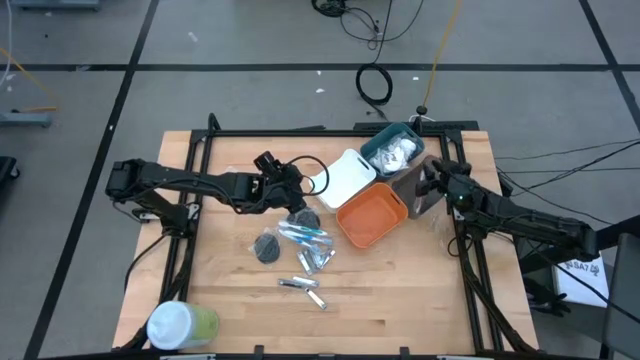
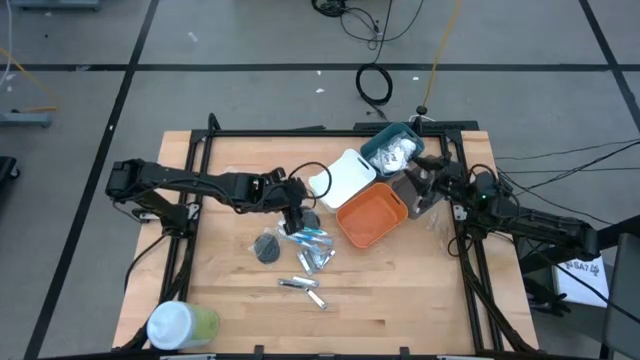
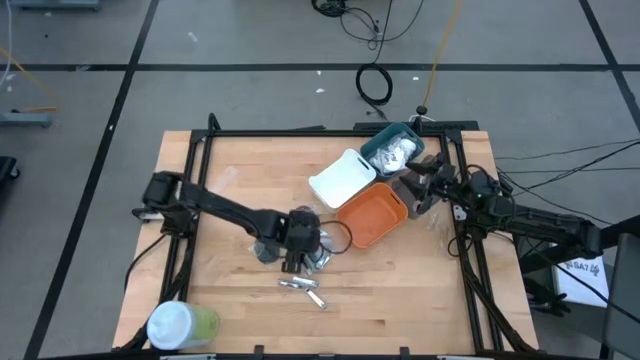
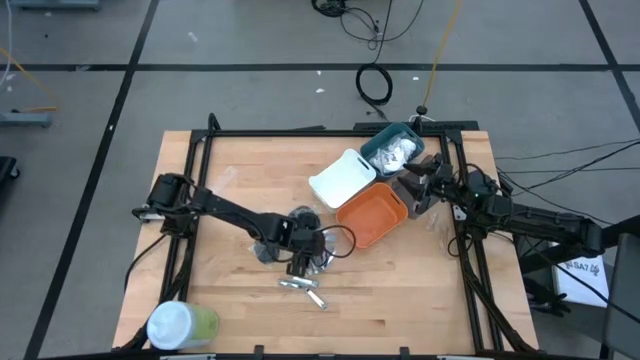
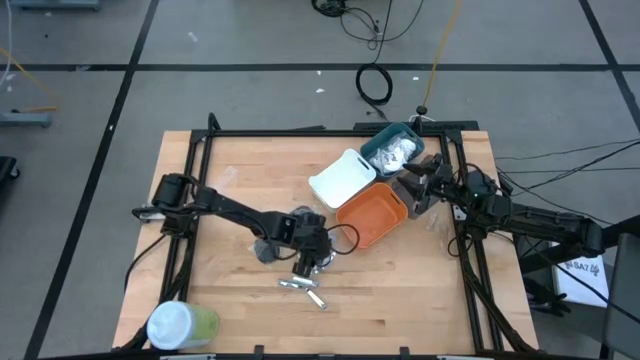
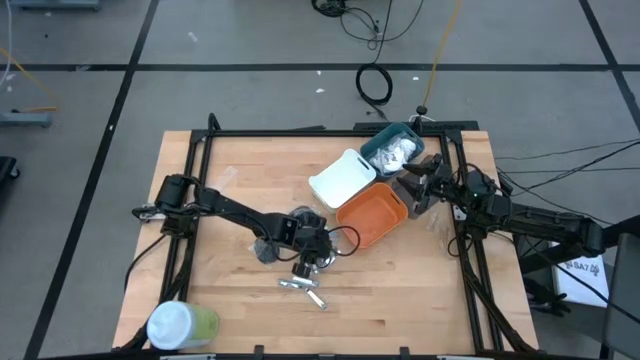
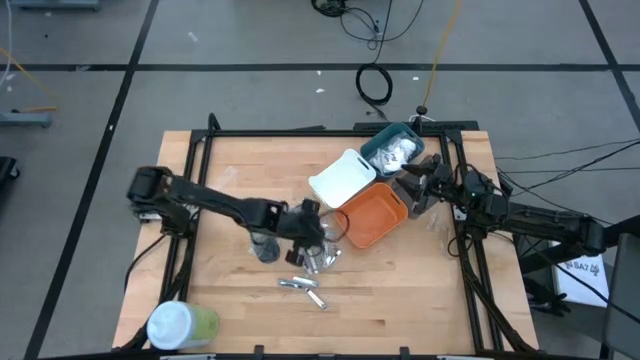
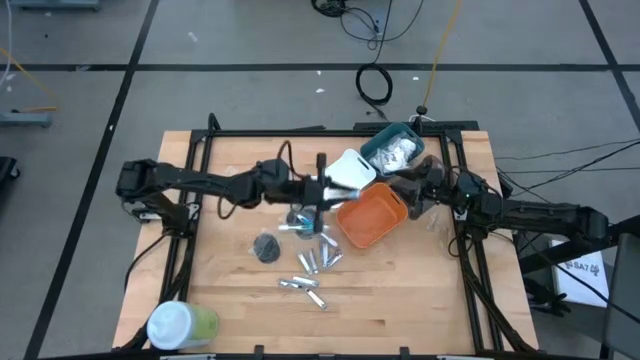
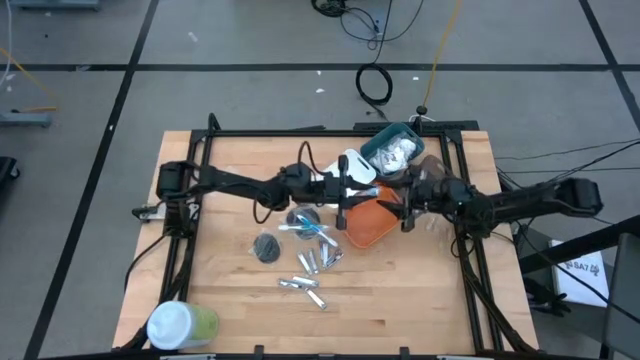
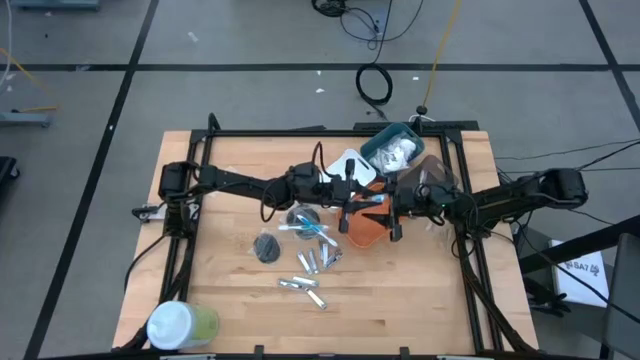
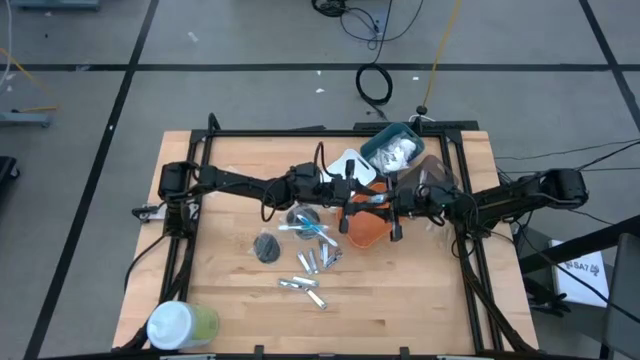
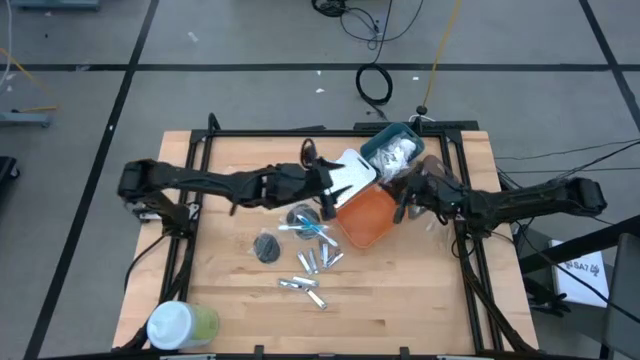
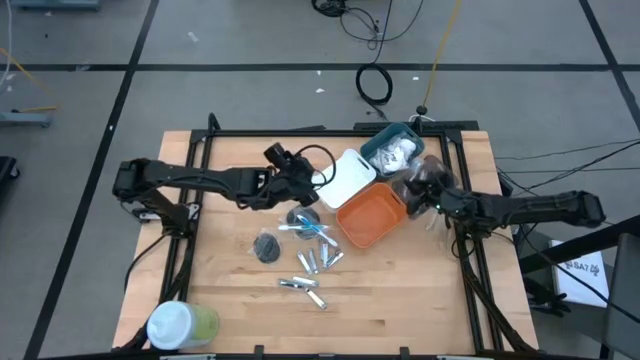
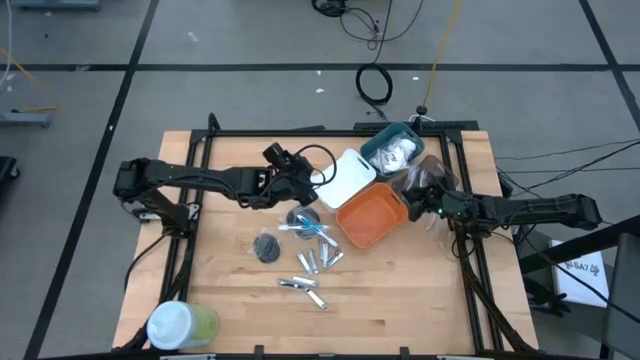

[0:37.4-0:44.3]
Task: Pick & Place Travel size toiletries
Put the blue toothbrush into the black bin

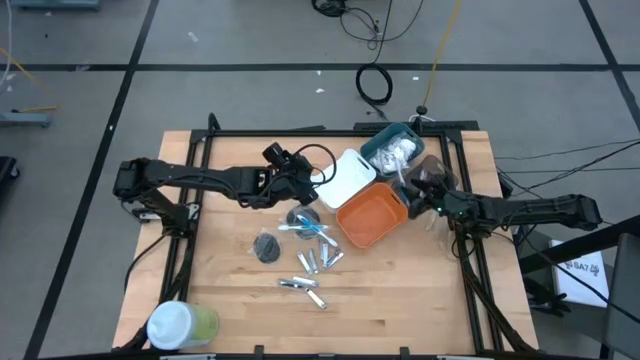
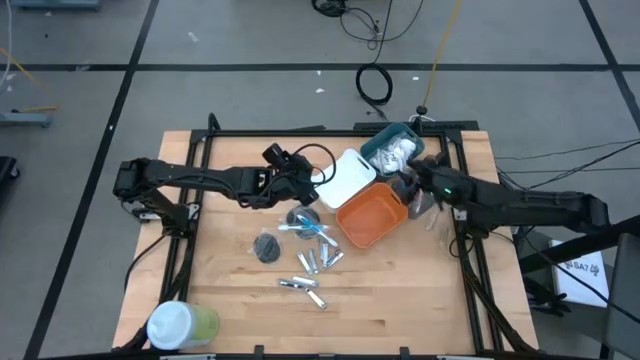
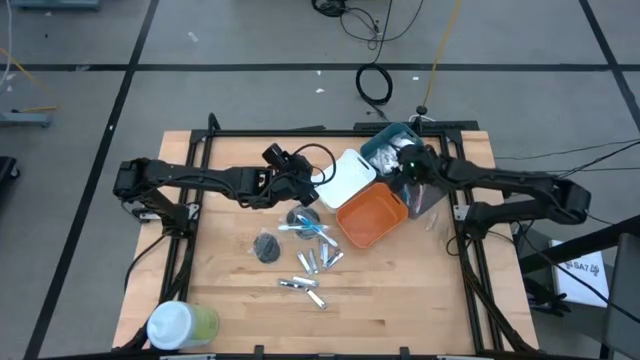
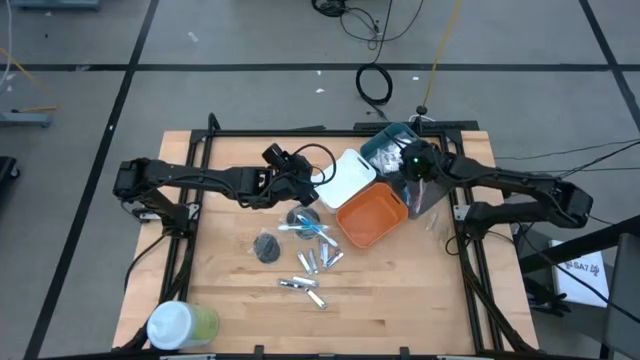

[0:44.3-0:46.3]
Put the blue toothbrush into the black bin

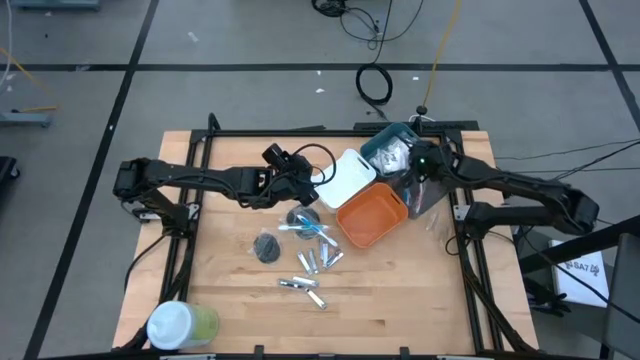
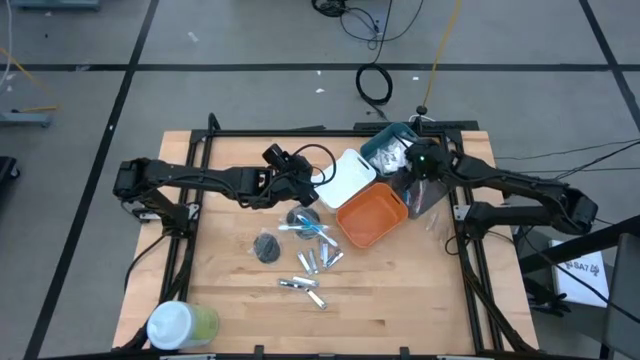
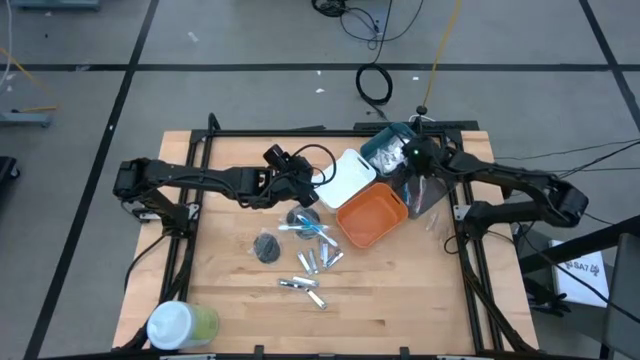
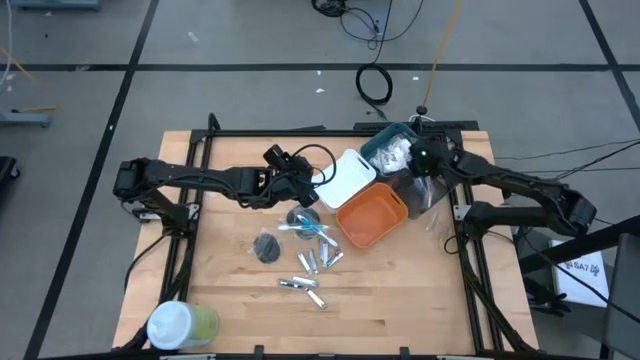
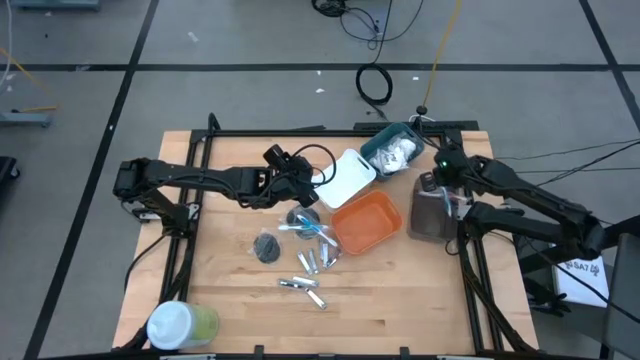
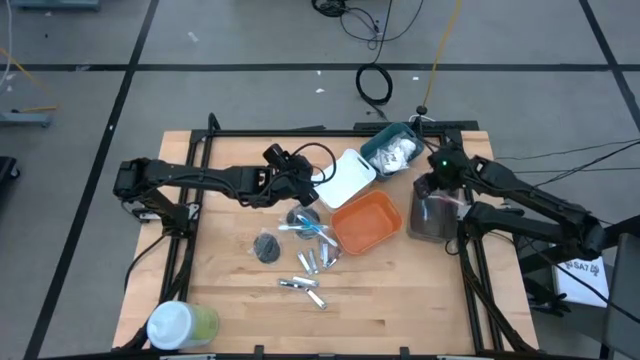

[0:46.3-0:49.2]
Put the blue toothbrush into the black bin

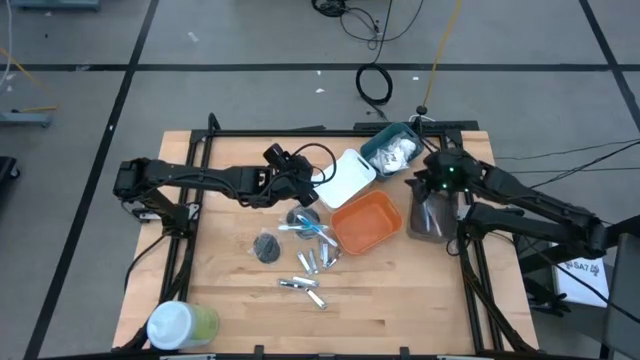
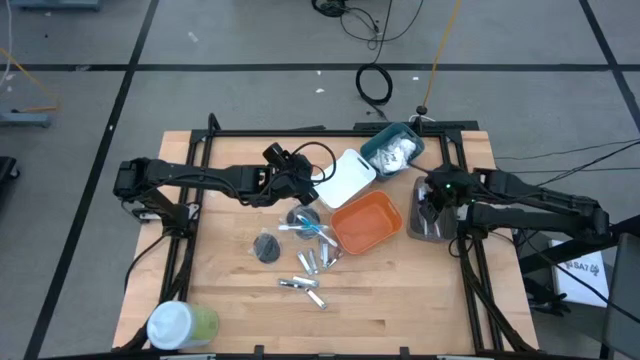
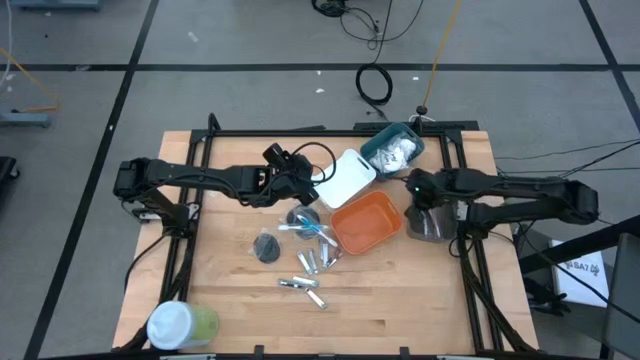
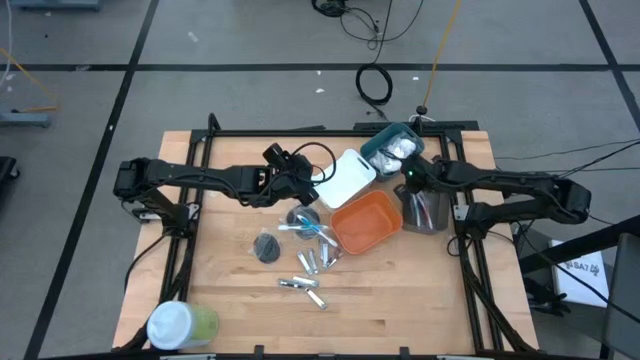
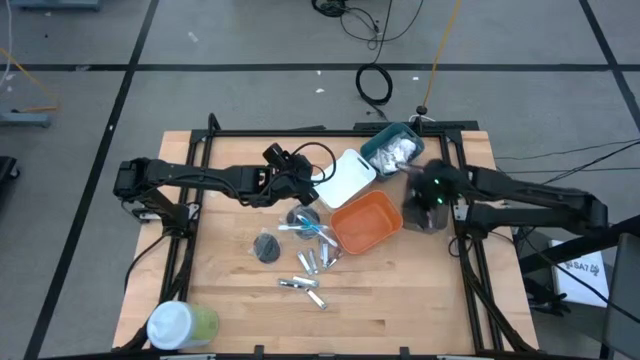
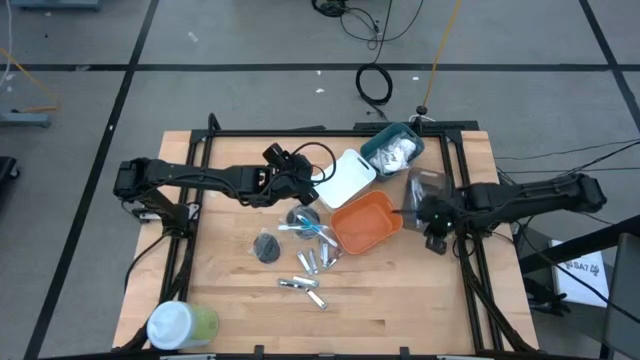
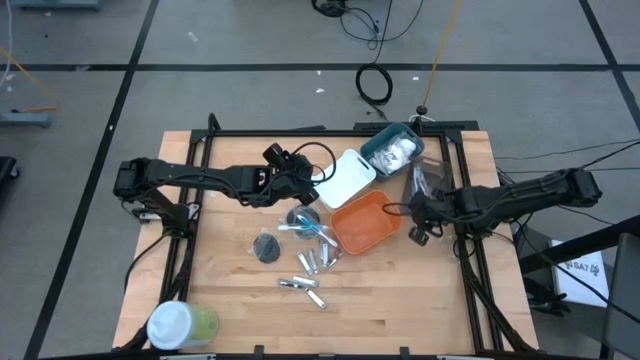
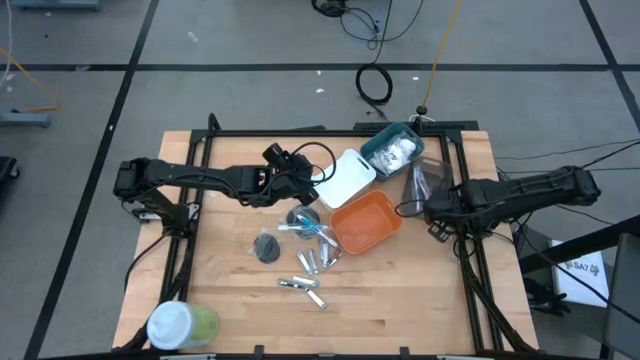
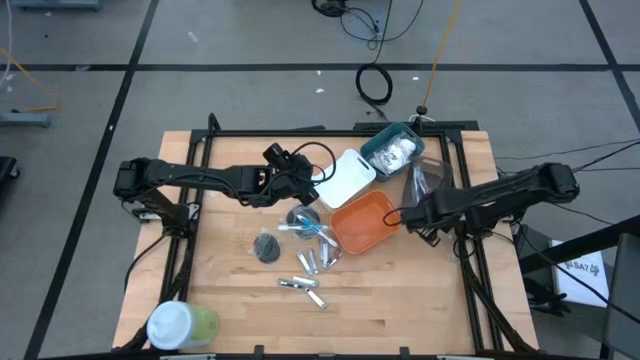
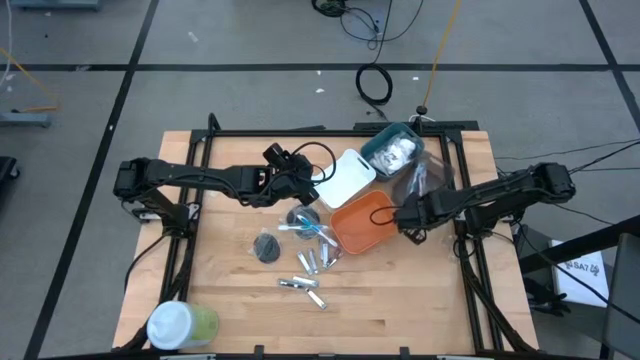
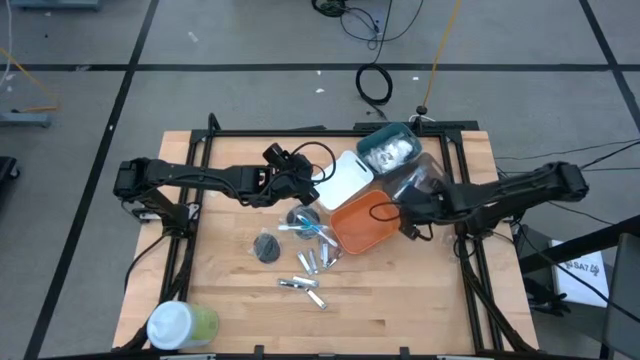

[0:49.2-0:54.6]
Adjust the black bin

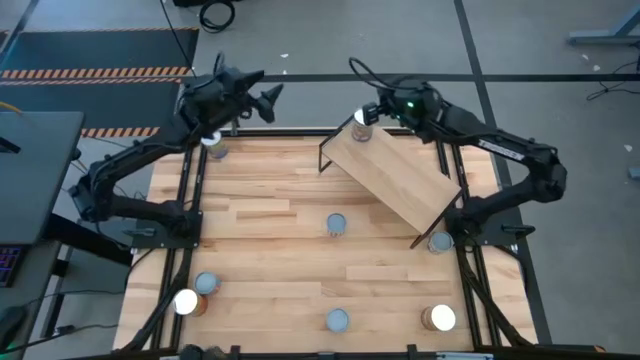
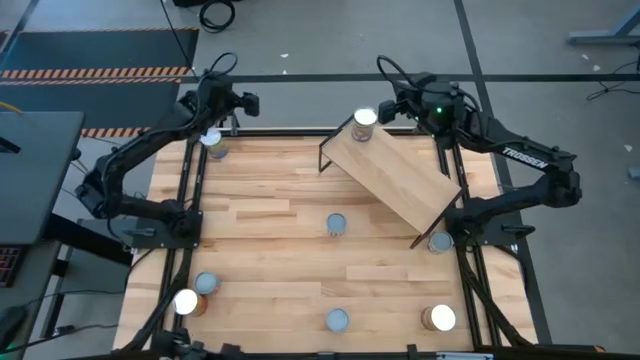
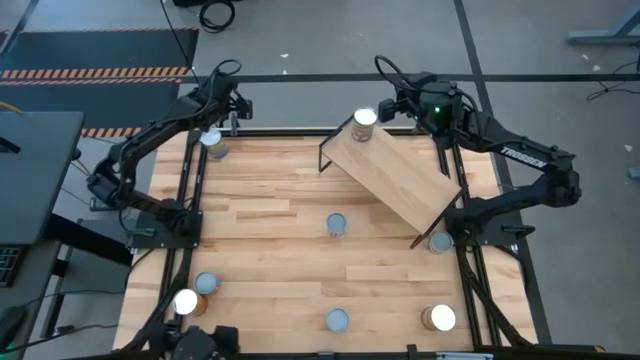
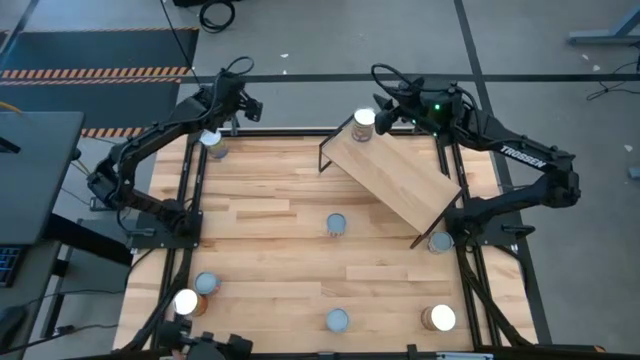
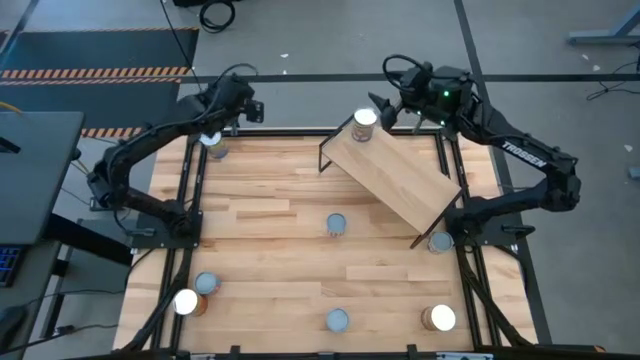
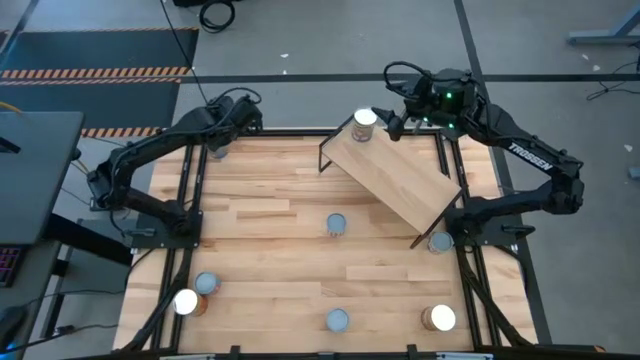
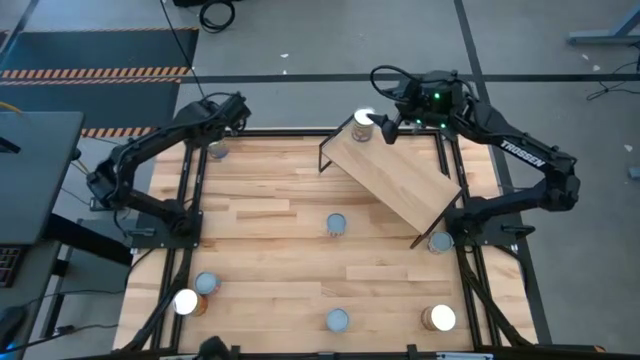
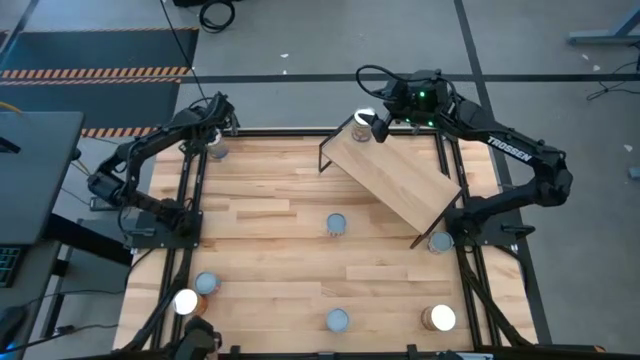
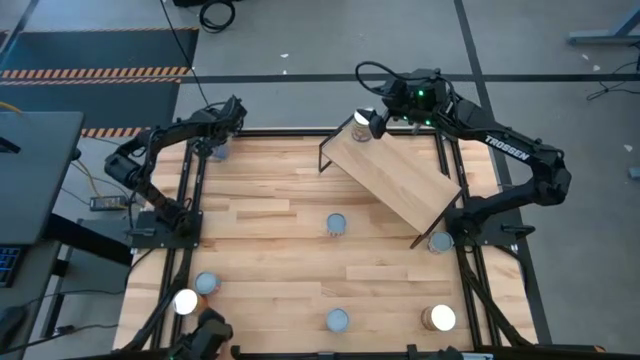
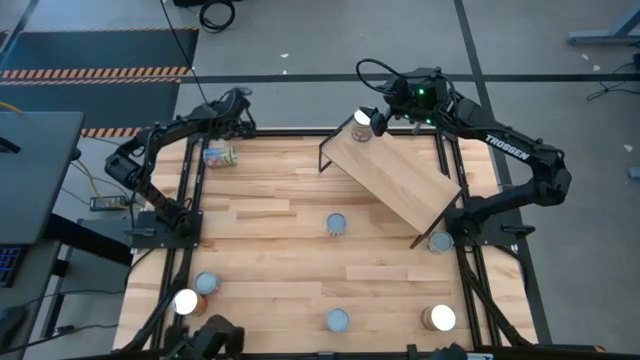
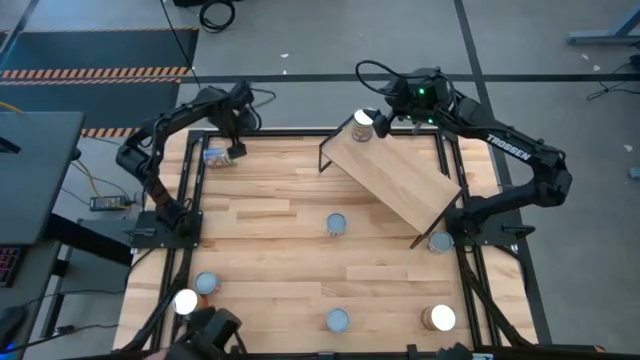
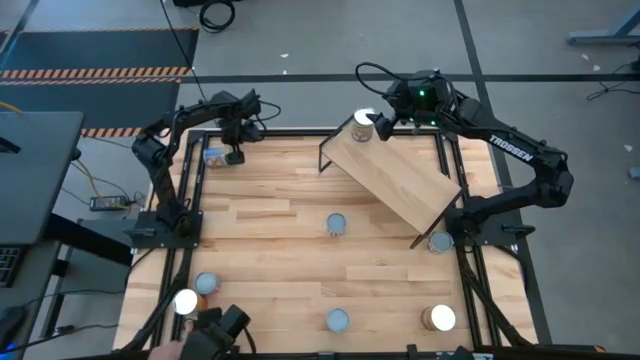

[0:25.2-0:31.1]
Task: Pick and place cans onto a shelf
Put the canned peaches can on the shelf
